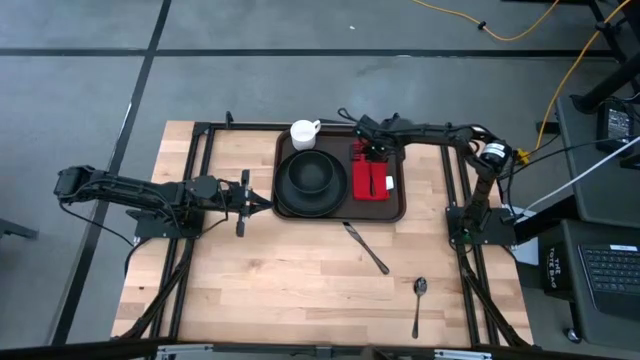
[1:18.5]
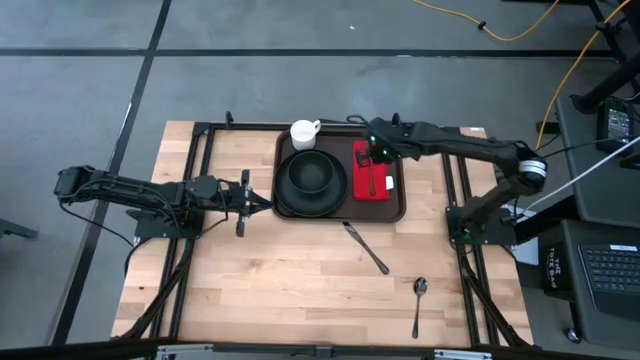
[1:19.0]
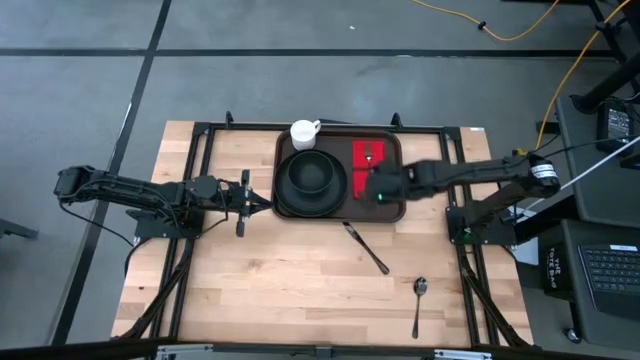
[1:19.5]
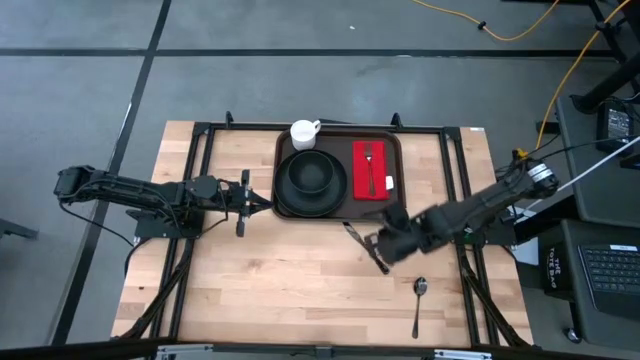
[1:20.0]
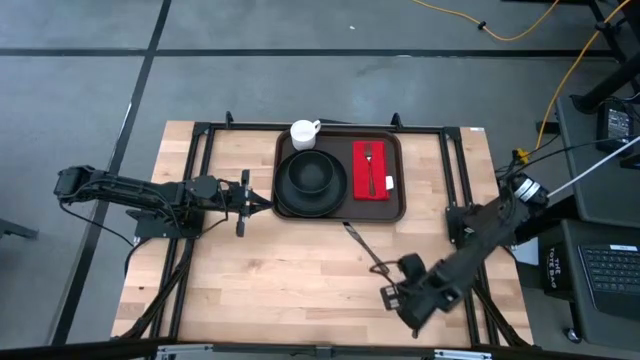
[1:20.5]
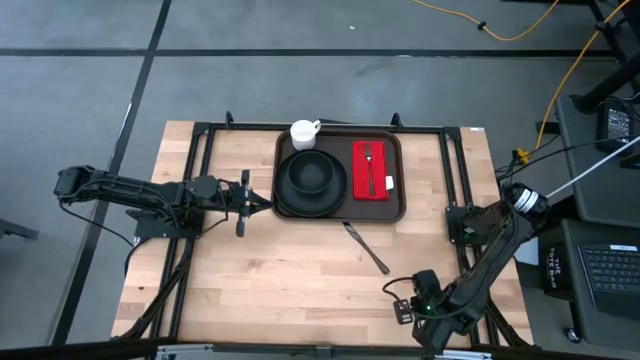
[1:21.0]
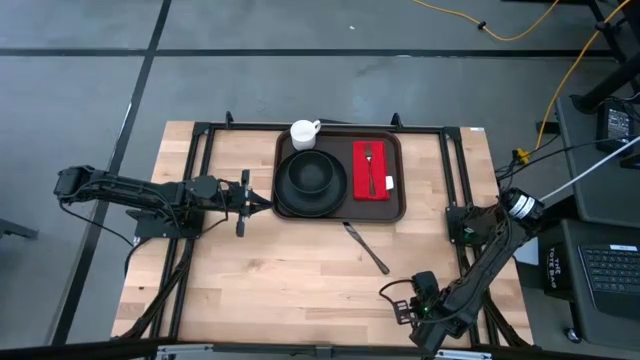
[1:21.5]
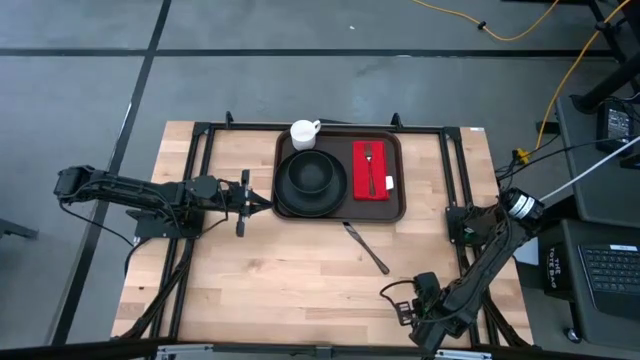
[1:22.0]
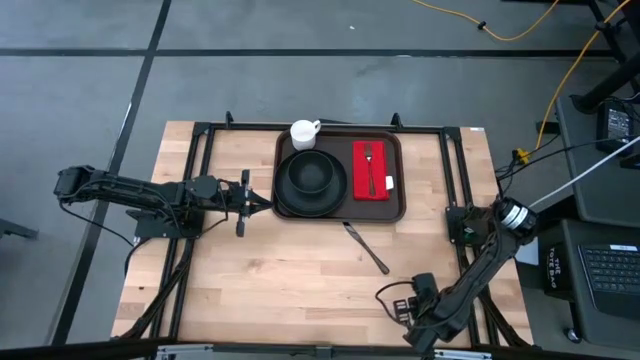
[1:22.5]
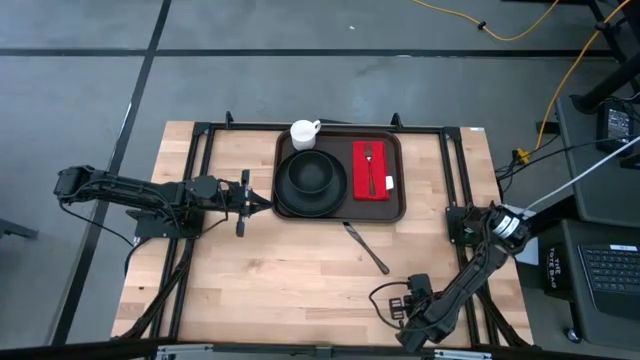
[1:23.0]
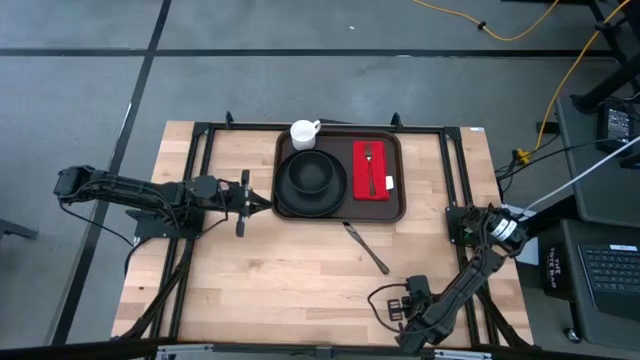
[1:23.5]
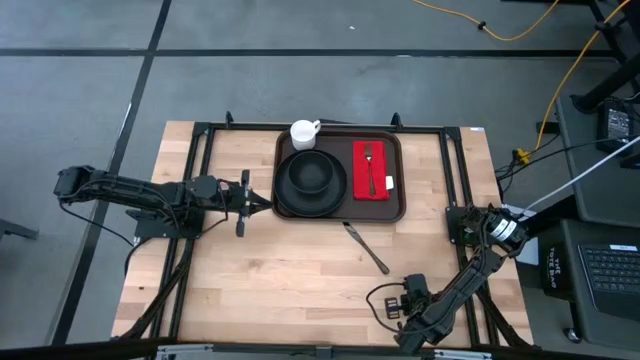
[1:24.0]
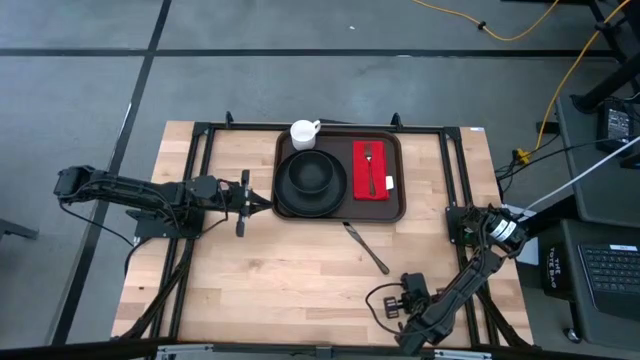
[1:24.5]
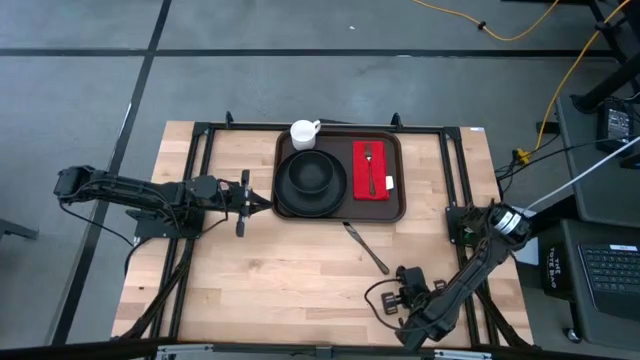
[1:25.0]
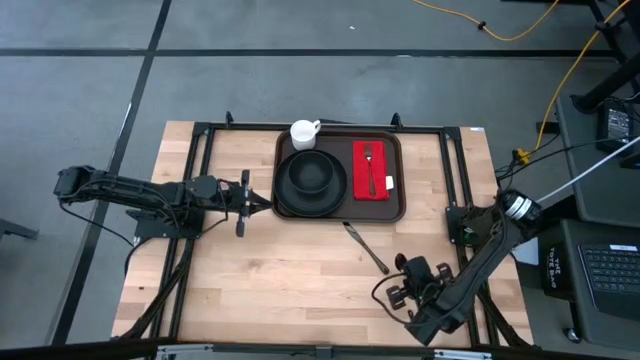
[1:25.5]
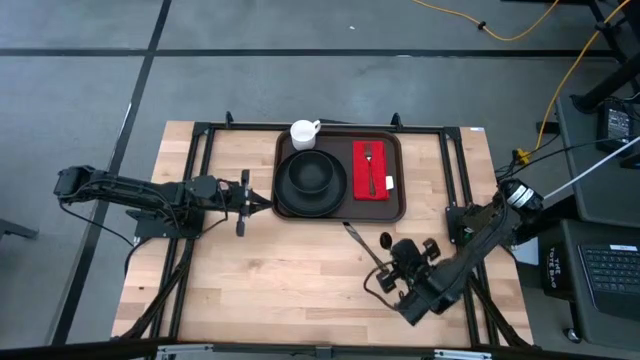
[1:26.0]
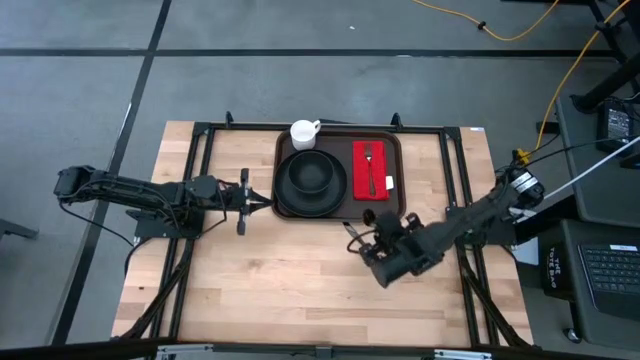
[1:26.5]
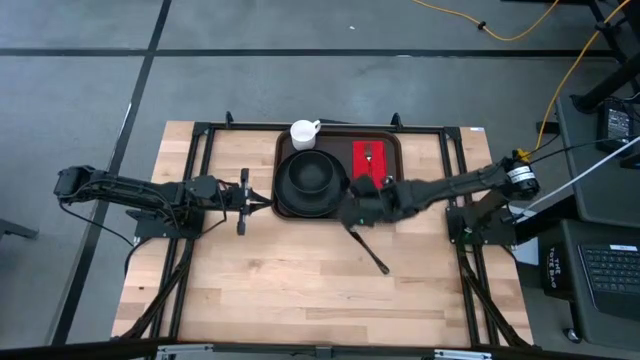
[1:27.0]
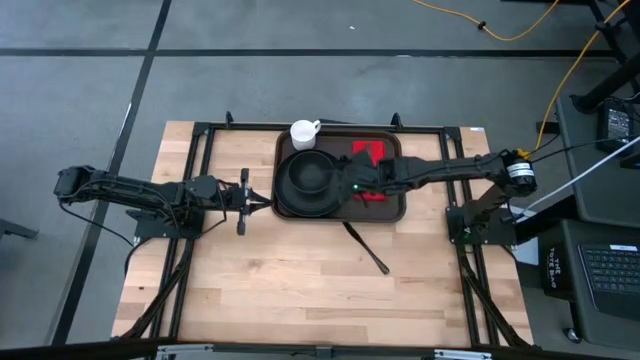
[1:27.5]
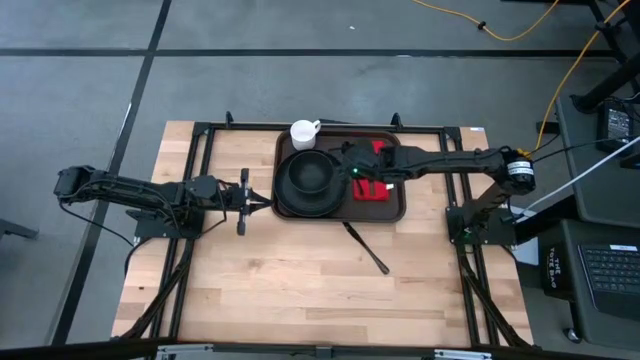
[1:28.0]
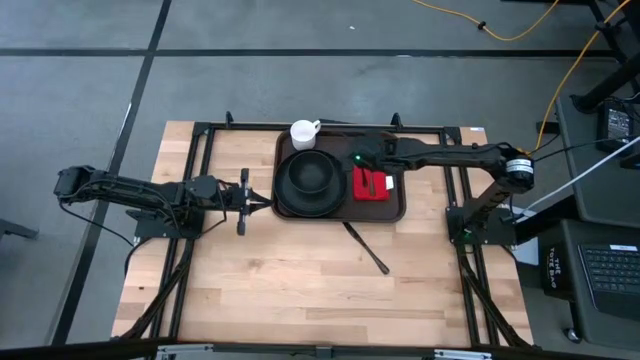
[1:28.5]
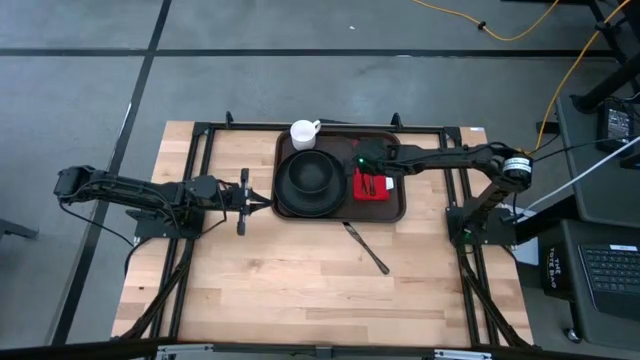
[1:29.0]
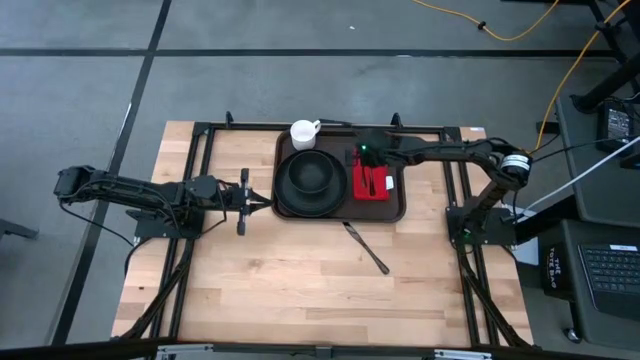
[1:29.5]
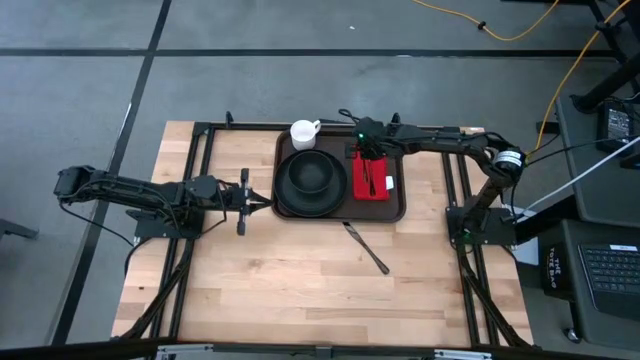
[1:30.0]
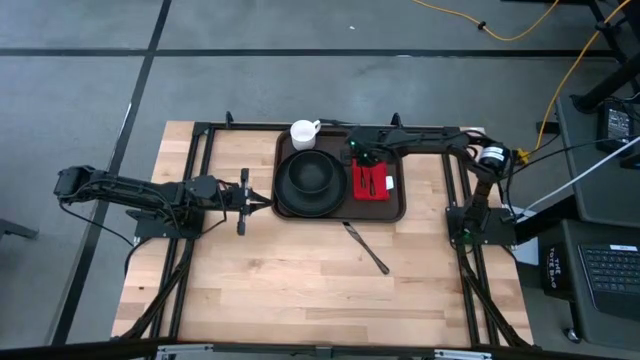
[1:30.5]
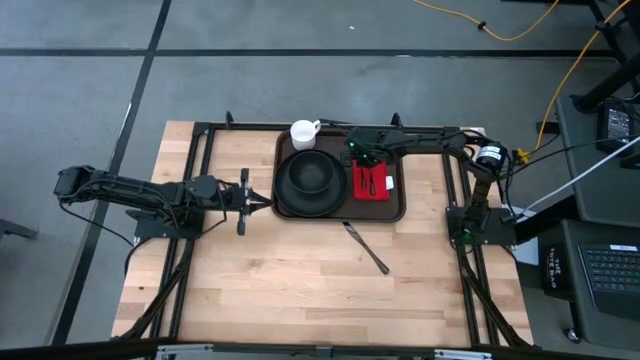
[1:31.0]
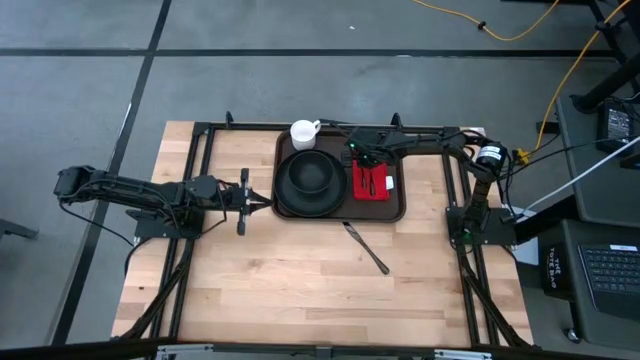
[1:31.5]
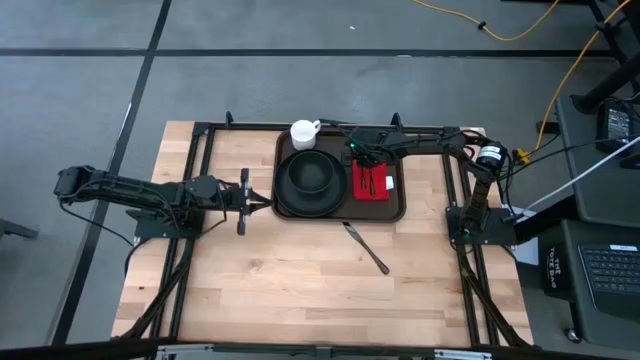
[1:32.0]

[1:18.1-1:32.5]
Task: Set up tray
Put the black spoon on the red napkin to the left of the black fork

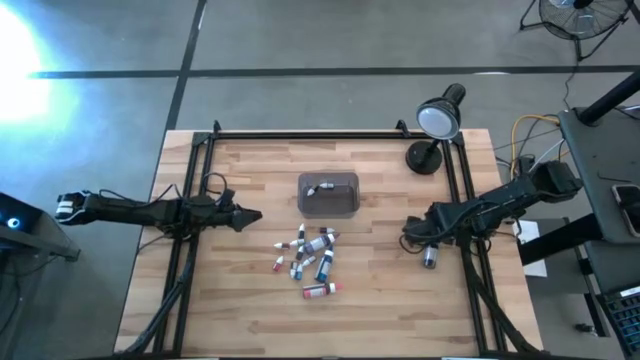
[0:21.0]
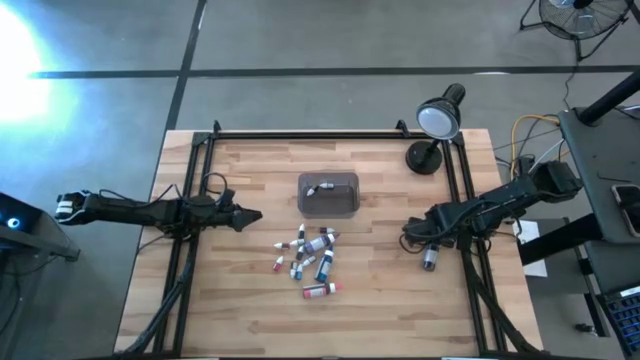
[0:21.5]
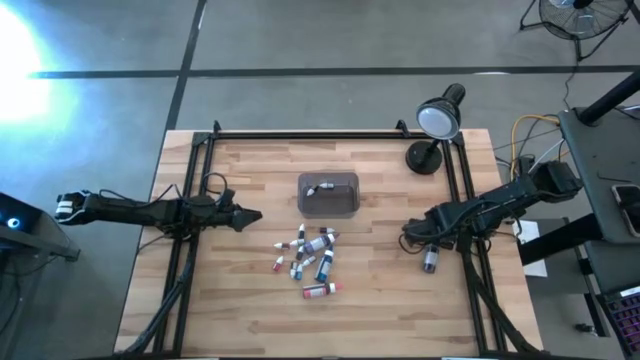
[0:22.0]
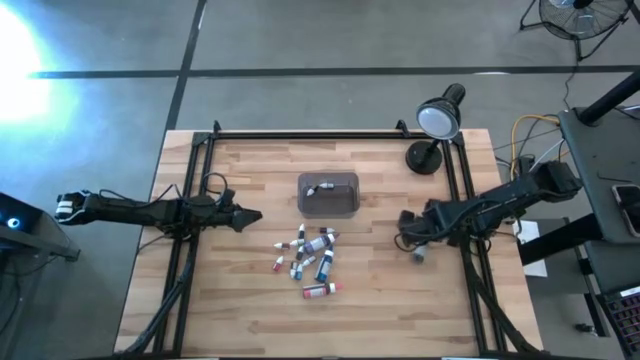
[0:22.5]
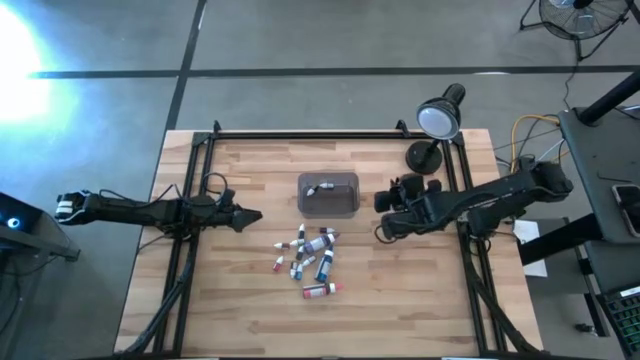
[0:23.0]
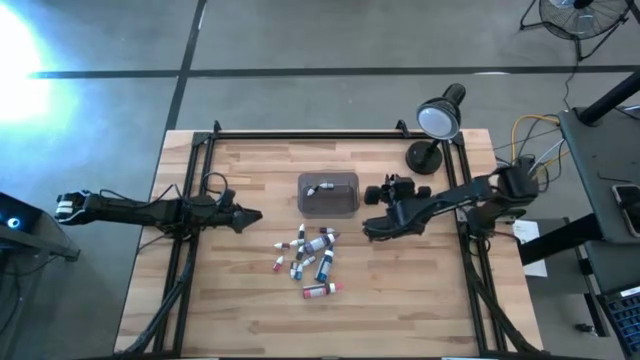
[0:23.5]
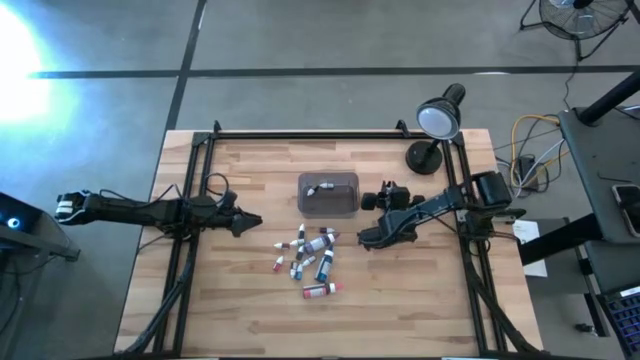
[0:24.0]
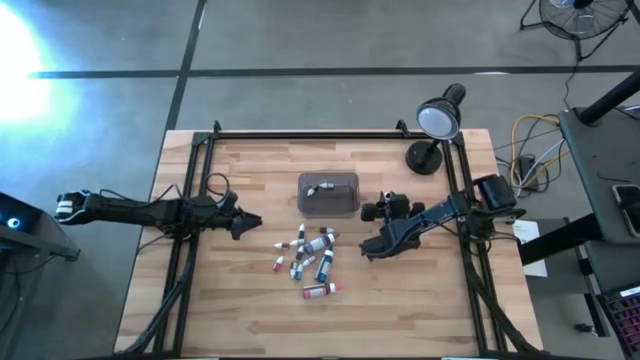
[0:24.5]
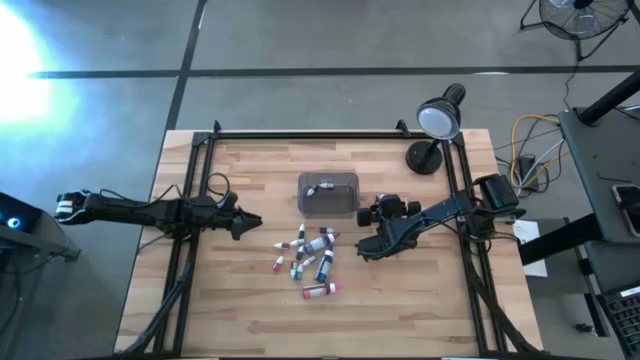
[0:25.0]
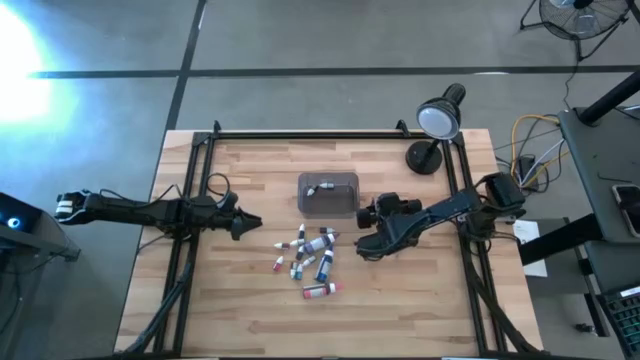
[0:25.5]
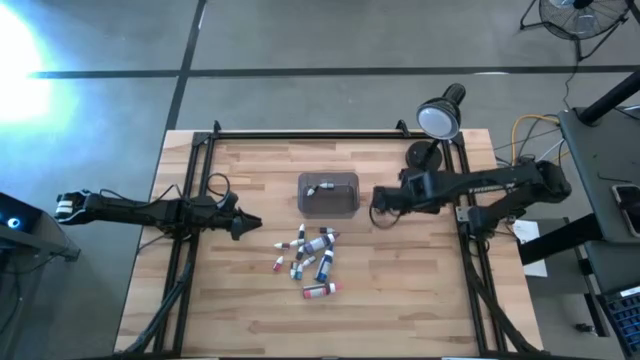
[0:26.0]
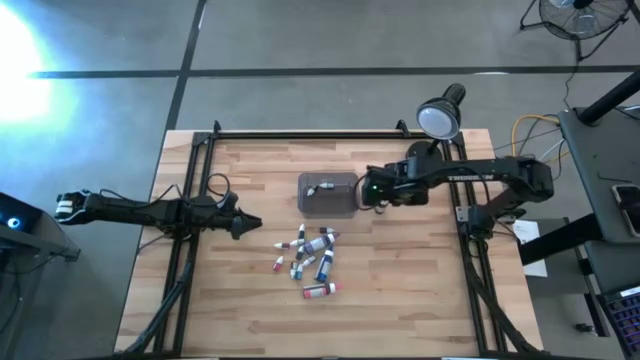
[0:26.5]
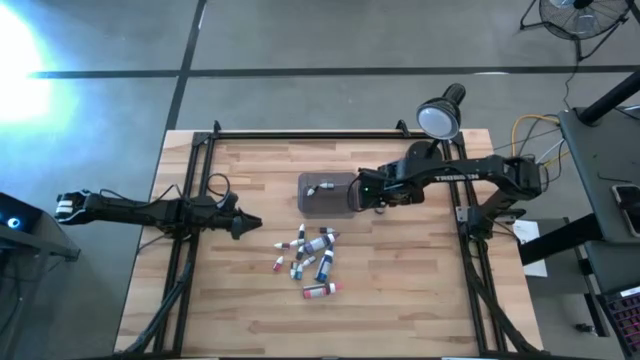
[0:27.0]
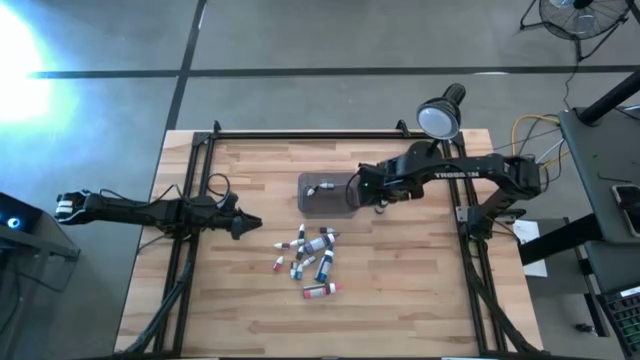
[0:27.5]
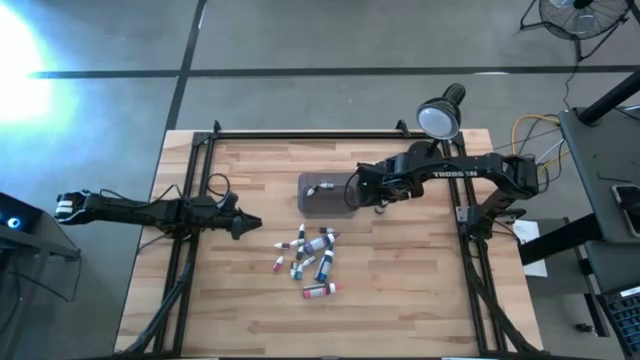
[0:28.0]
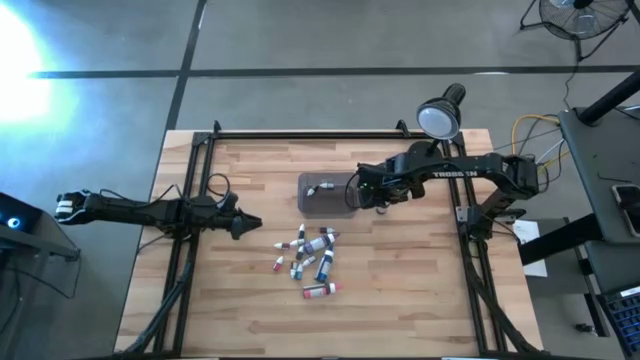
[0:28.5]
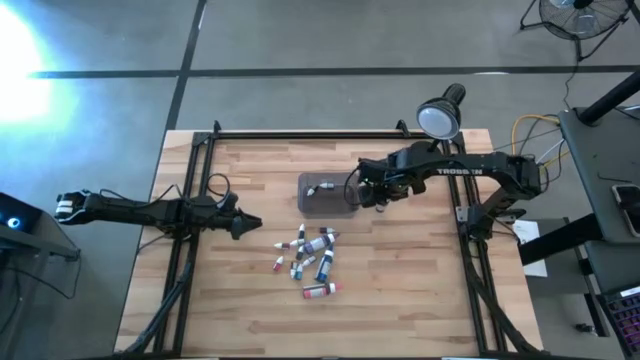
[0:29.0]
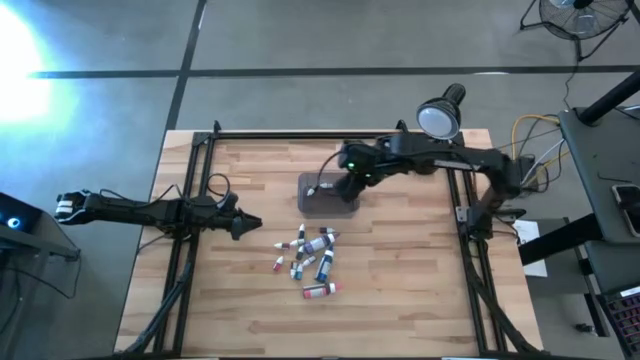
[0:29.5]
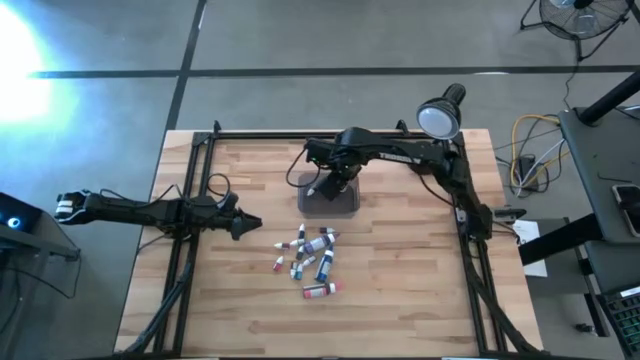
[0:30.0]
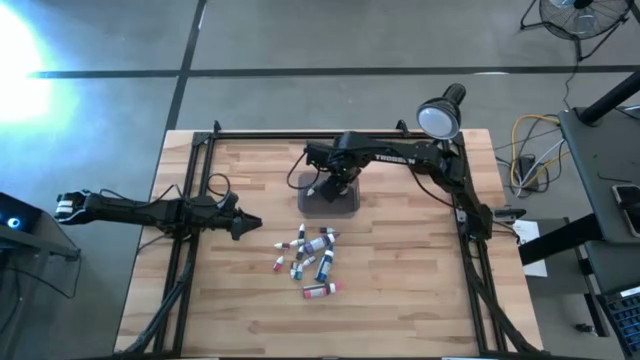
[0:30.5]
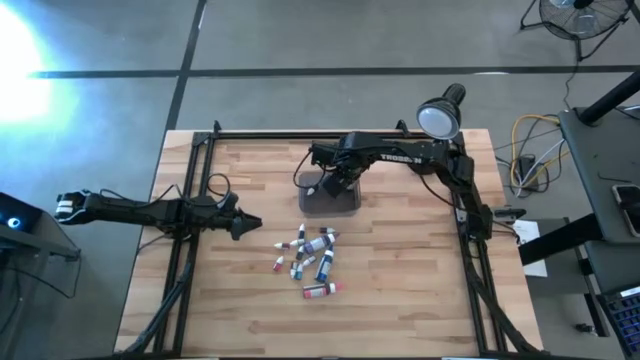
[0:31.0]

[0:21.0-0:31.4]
Task: Pick & Place food coloring
Put the large black food coloring bottle into the bin
